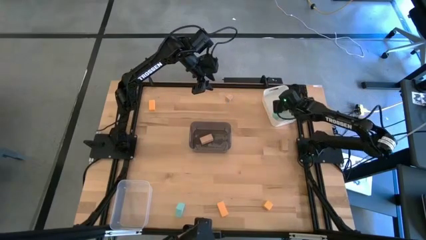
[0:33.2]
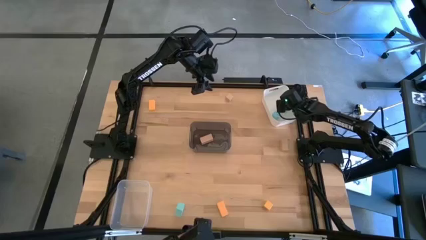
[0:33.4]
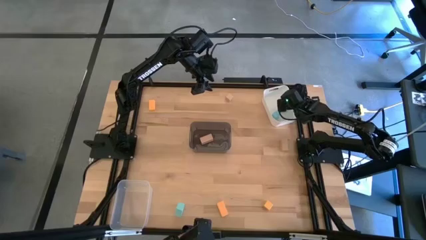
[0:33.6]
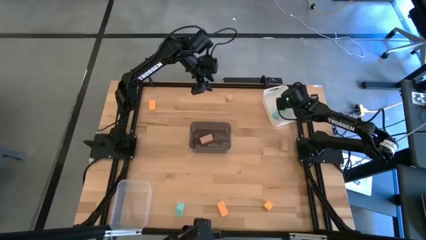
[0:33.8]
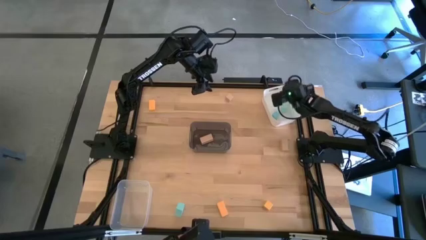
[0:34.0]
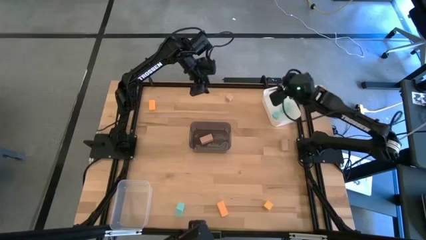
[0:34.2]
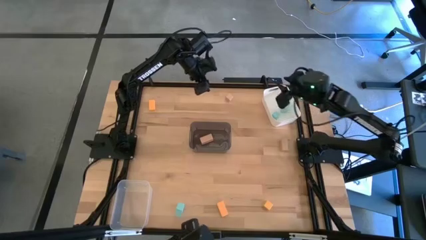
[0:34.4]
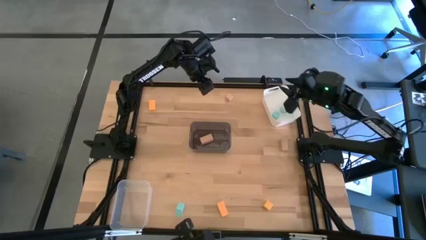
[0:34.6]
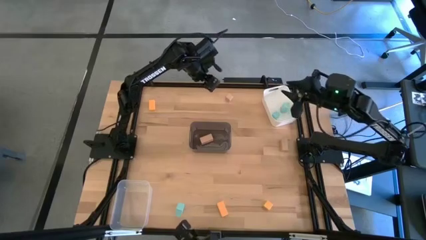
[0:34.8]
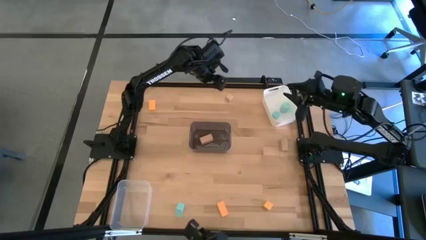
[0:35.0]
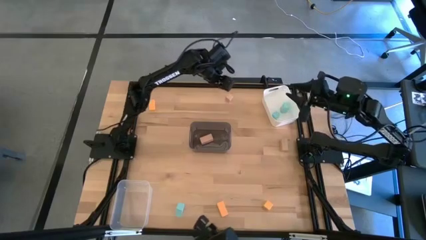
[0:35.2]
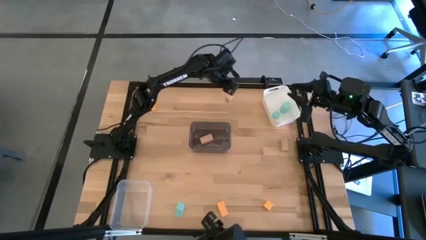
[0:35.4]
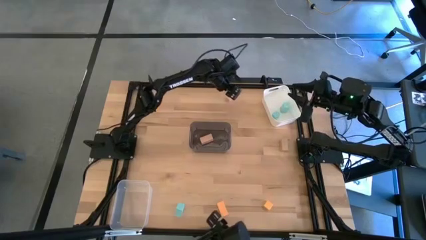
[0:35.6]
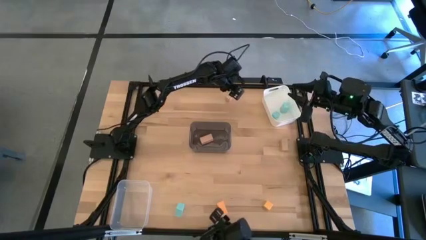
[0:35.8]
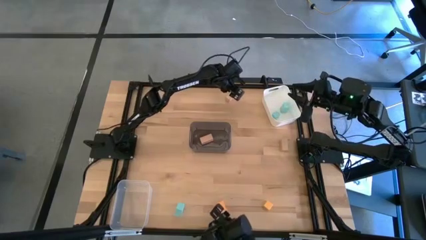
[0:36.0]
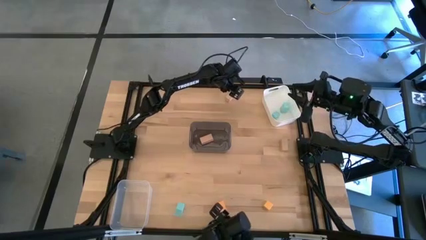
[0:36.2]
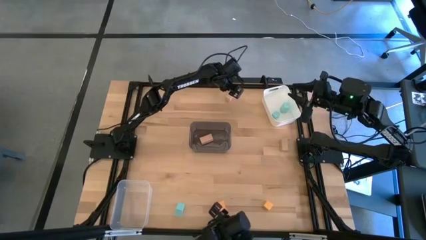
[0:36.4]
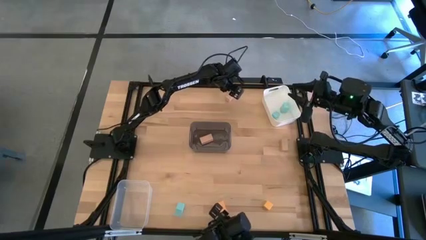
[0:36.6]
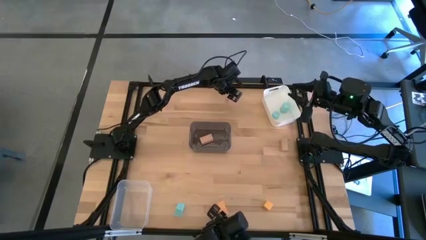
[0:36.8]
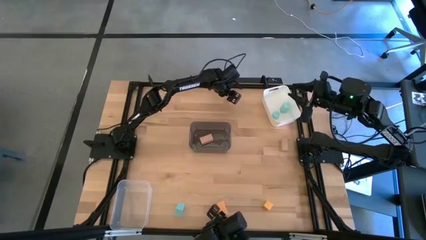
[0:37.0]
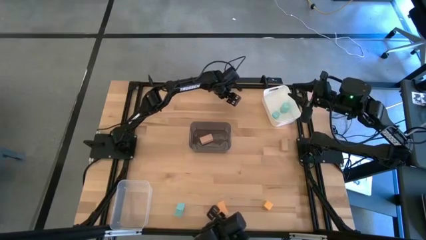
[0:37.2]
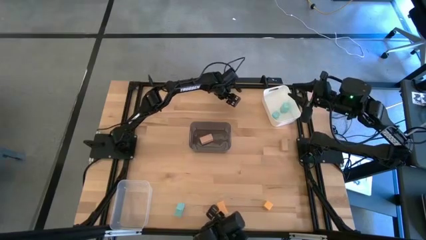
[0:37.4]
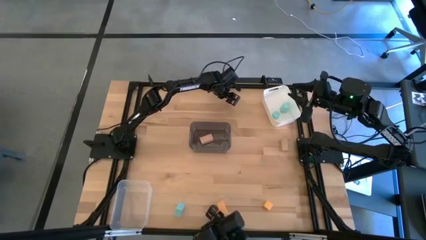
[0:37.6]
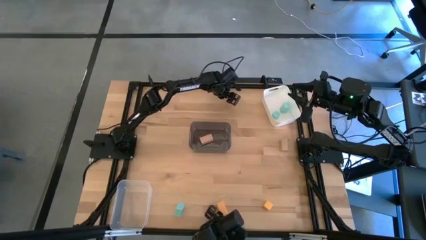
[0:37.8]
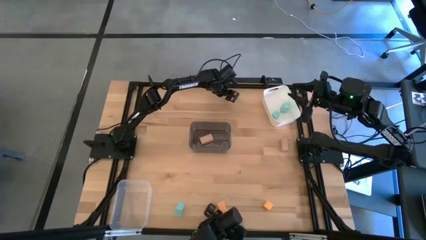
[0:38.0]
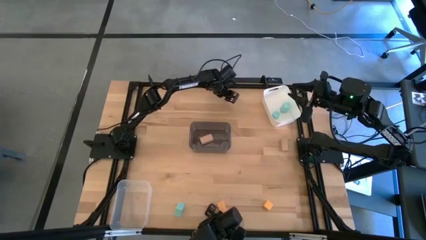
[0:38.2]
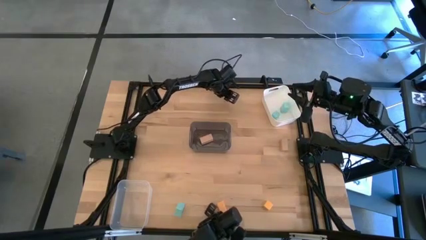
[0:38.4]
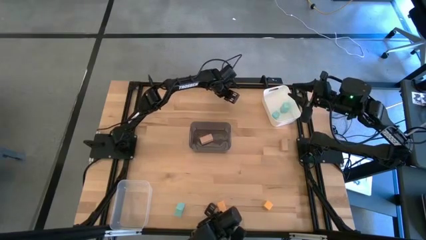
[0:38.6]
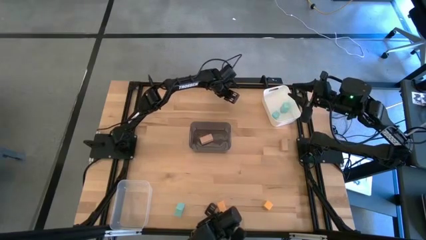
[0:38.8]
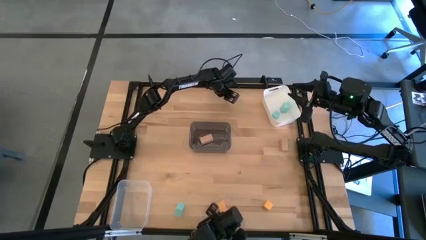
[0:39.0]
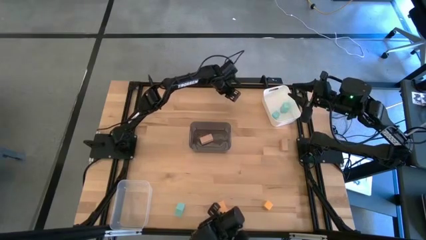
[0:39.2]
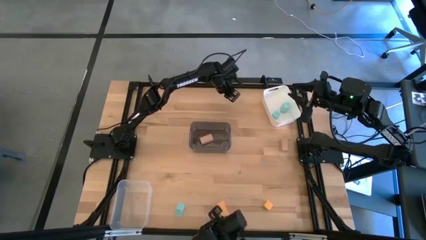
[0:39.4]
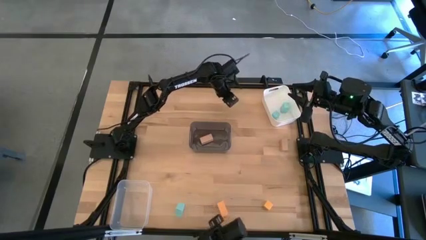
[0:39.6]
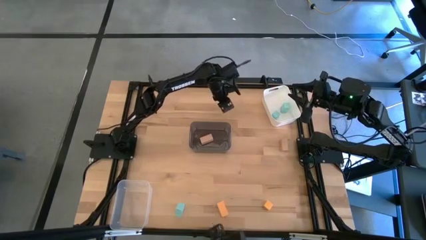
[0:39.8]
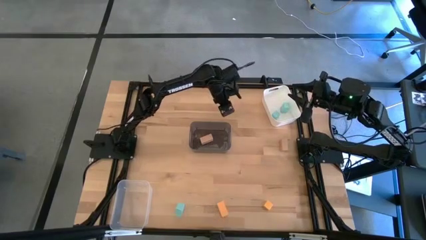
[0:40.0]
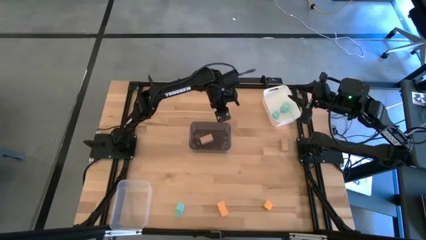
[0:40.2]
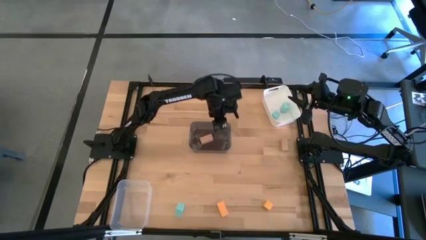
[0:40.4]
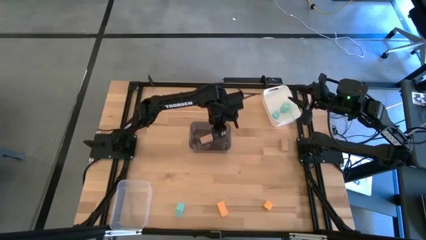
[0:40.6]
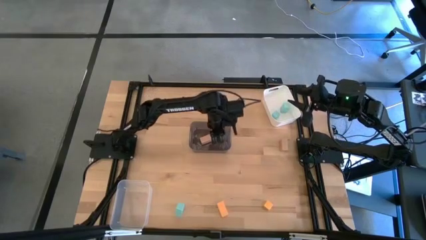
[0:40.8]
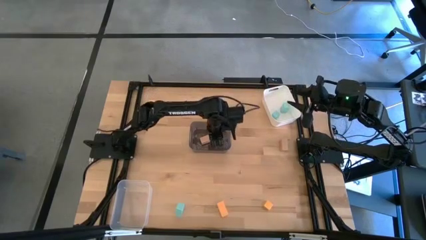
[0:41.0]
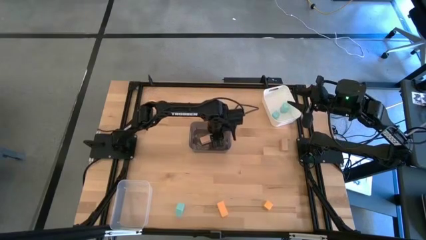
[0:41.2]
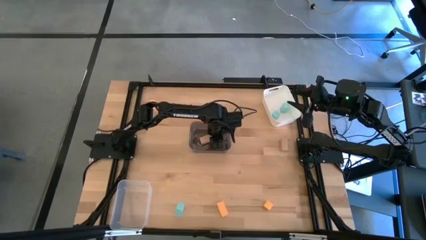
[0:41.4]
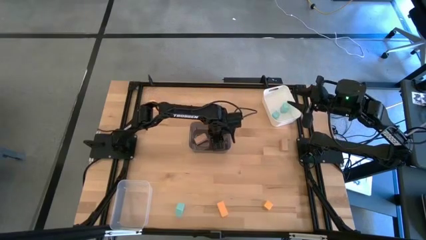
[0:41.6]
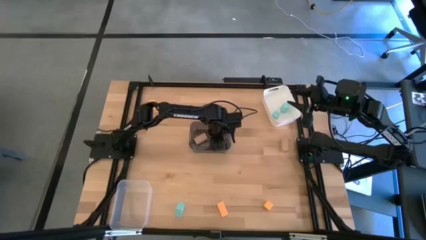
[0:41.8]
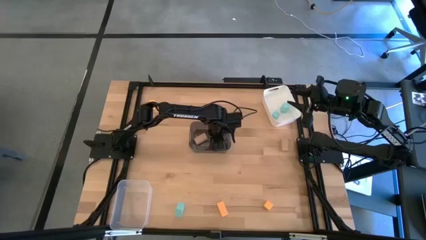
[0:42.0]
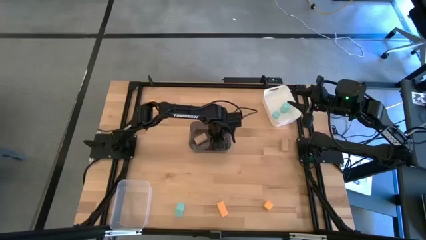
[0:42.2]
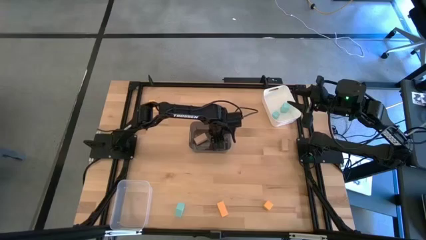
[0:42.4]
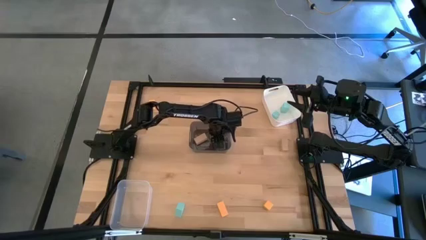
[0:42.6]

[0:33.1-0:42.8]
Task: Sort & place blocks by color
Put the top brown block into the black bin

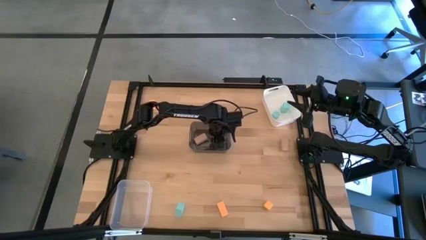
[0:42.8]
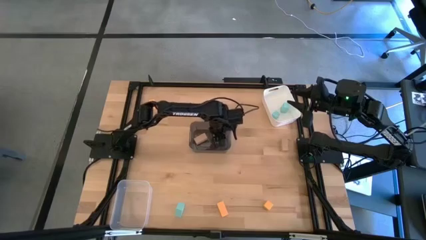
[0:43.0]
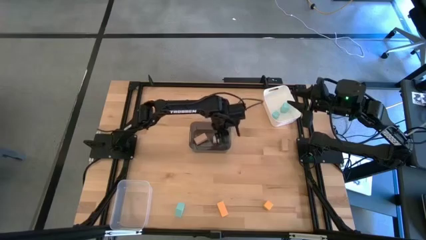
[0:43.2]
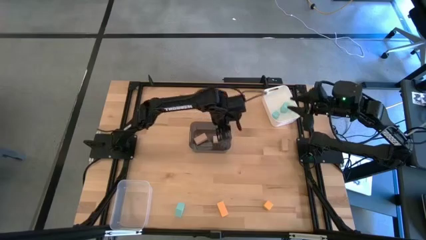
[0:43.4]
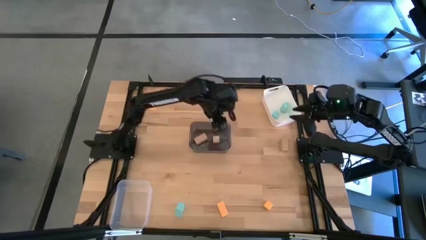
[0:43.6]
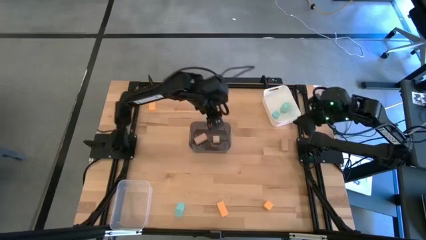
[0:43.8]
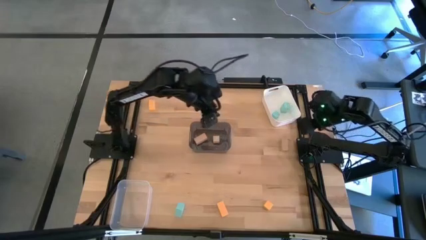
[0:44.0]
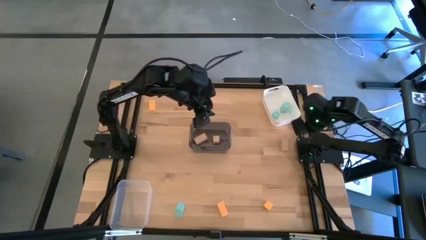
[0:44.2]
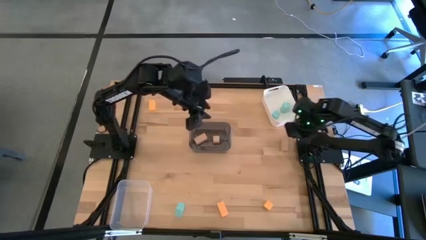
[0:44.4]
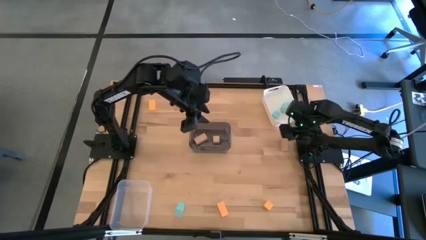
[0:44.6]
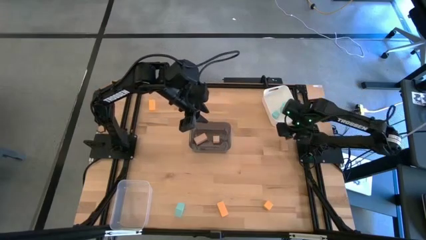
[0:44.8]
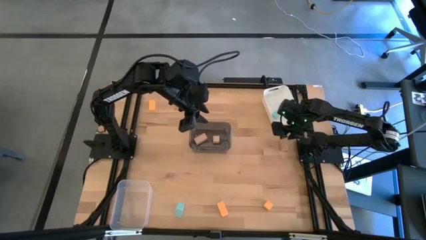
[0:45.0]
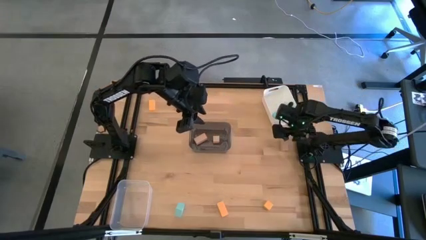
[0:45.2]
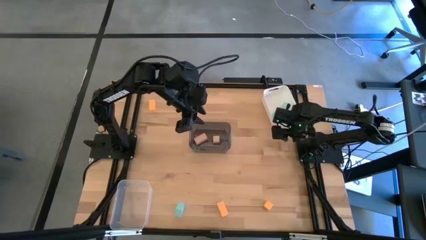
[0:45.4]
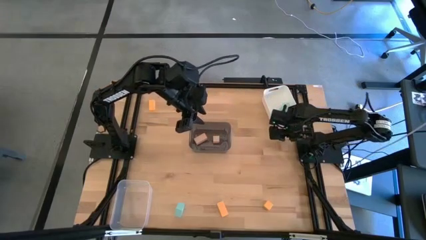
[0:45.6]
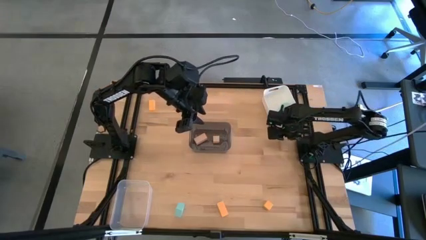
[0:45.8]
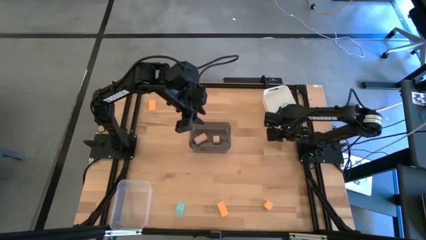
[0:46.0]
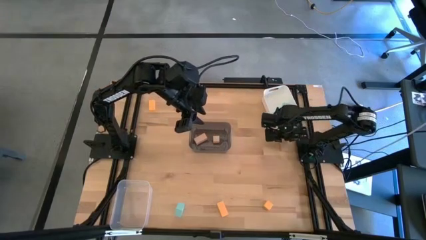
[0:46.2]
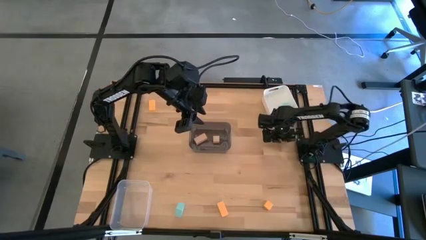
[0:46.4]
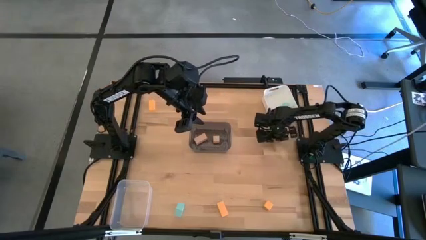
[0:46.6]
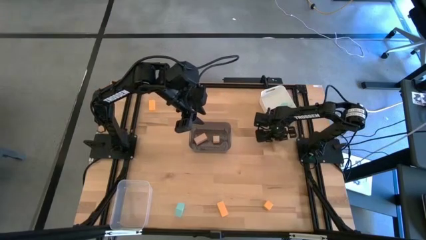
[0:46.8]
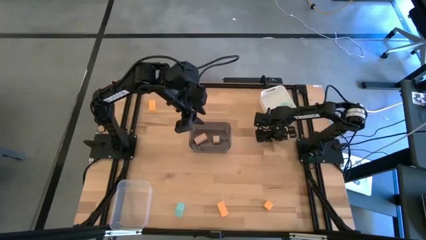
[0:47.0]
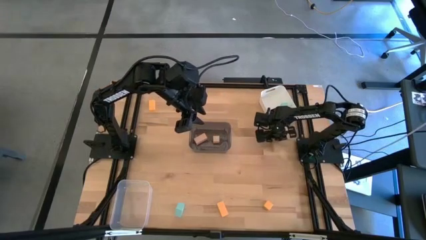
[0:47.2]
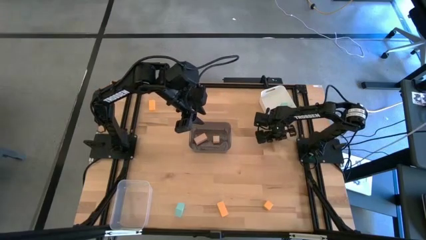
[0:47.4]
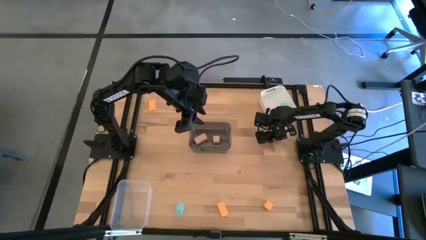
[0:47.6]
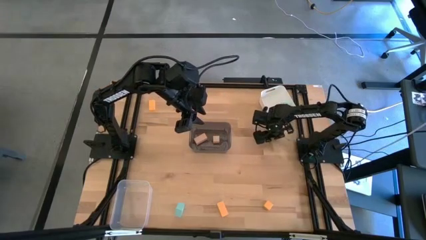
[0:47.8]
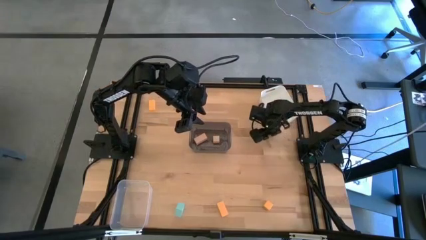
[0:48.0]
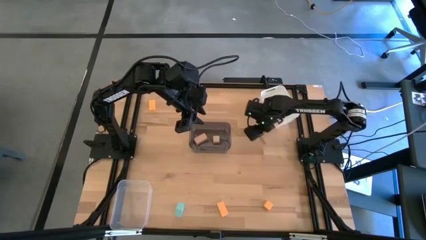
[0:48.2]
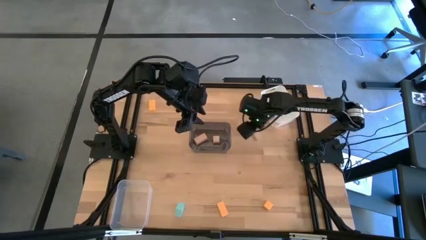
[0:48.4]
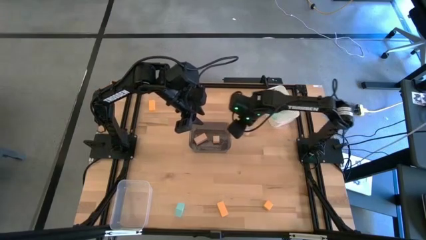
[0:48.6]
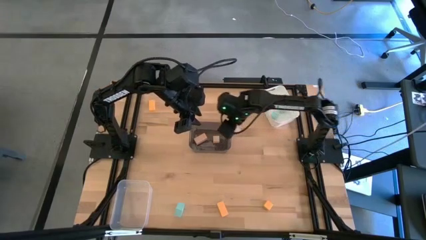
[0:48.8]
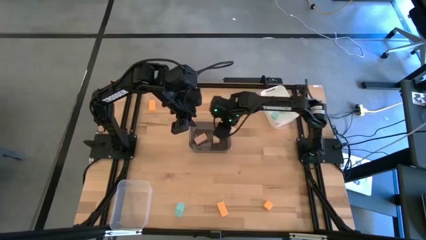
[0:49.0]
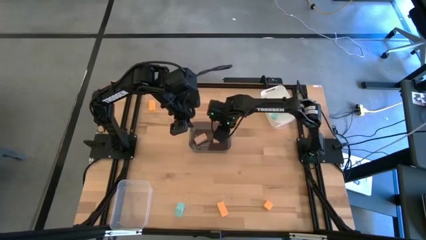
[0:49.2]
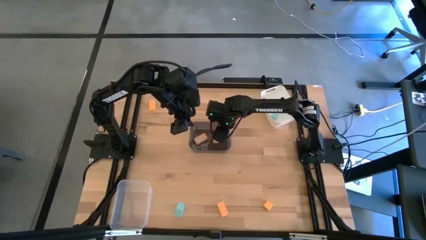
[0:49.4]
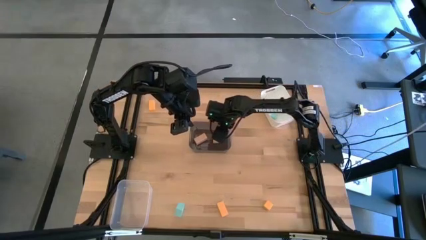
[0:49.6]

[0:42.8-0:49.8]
Put the brown block into the black bin
